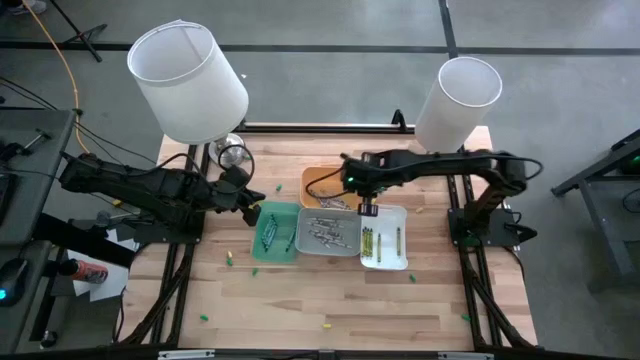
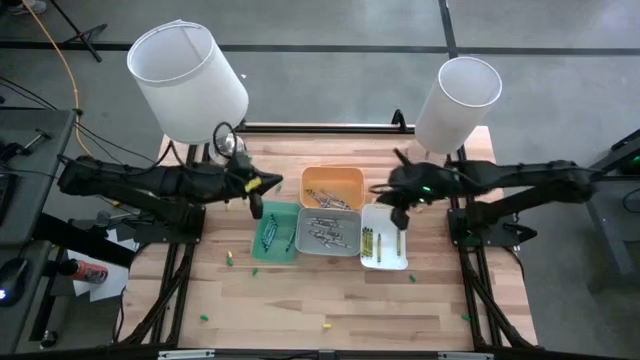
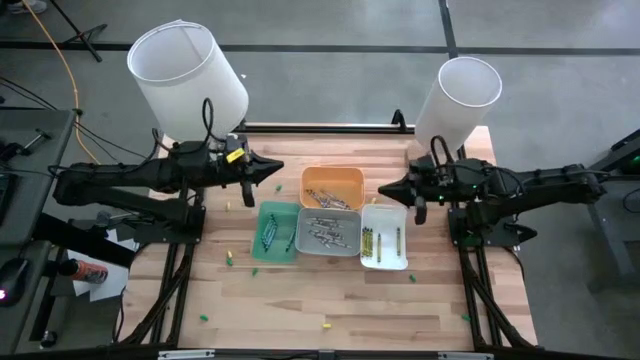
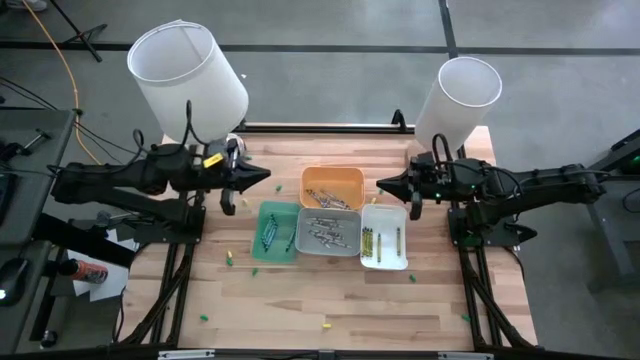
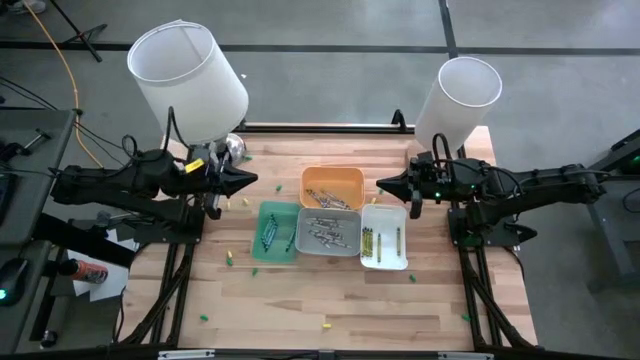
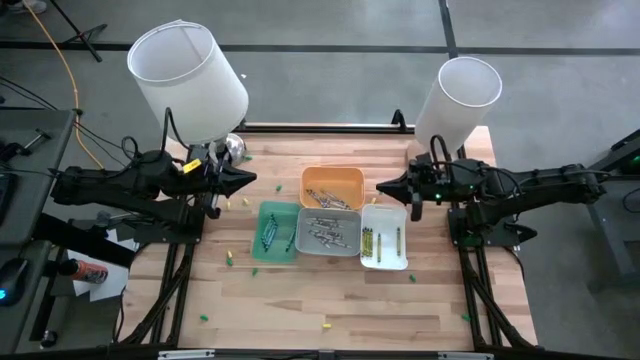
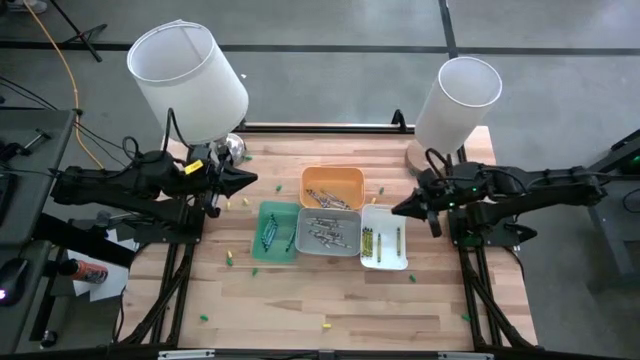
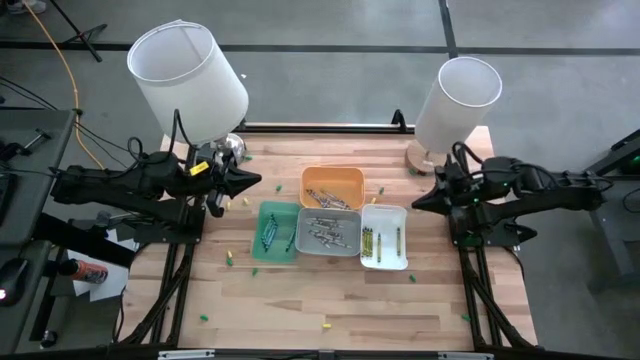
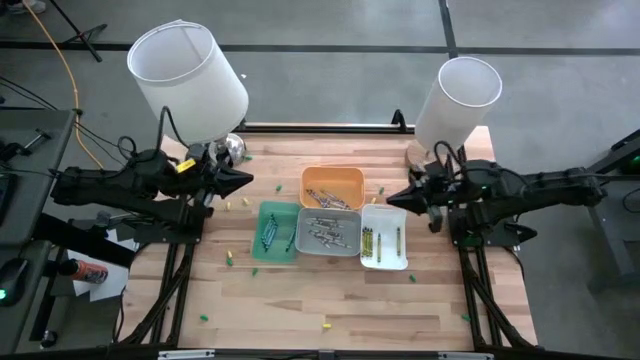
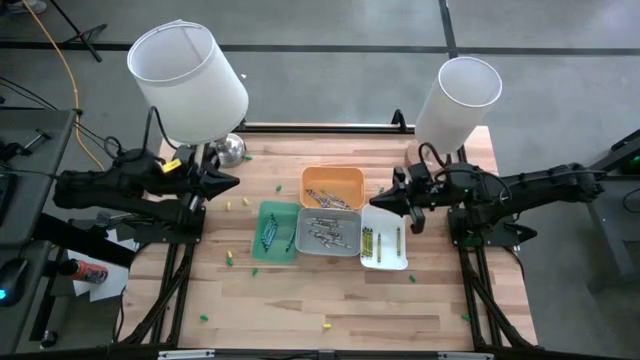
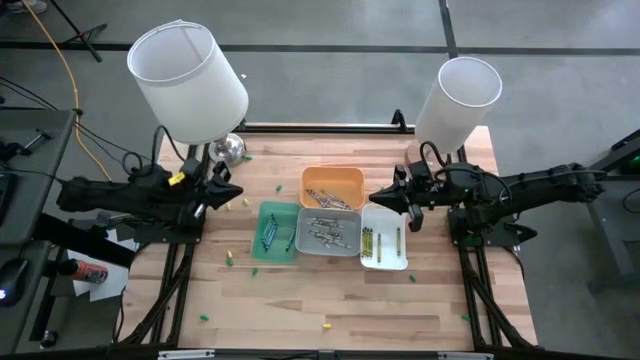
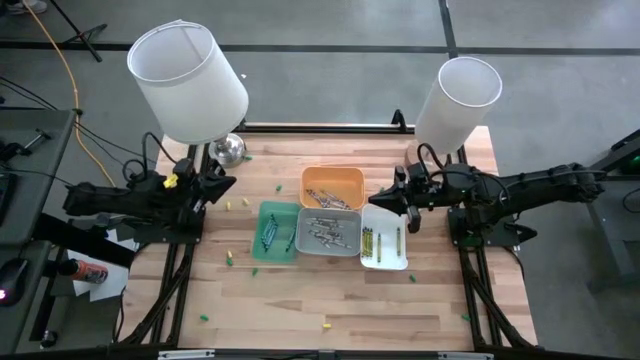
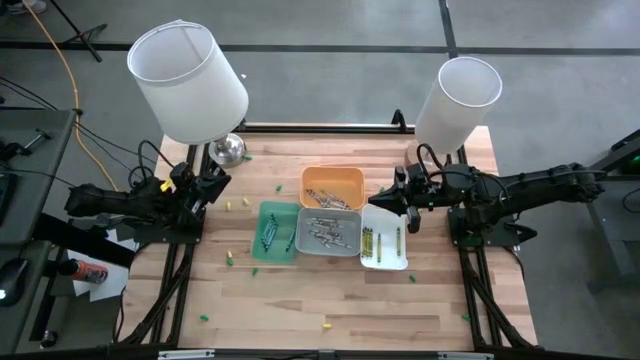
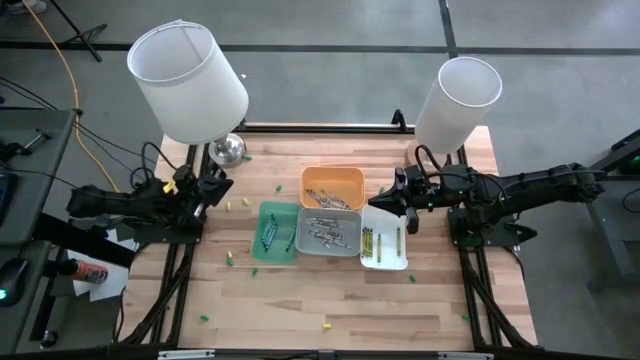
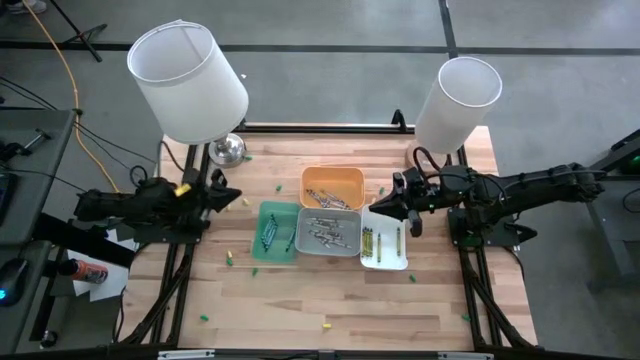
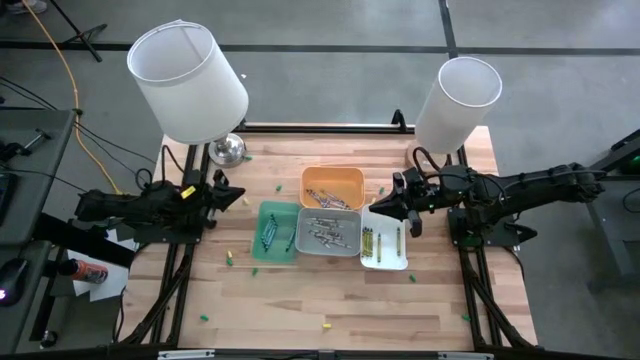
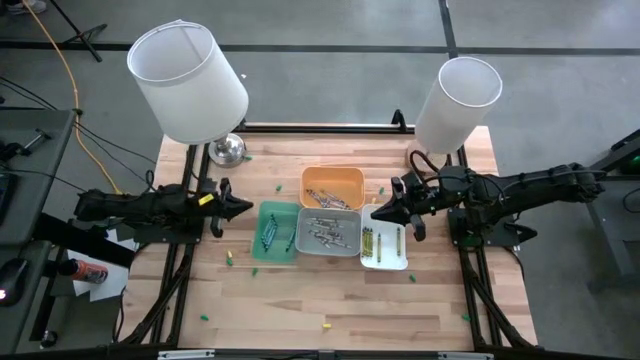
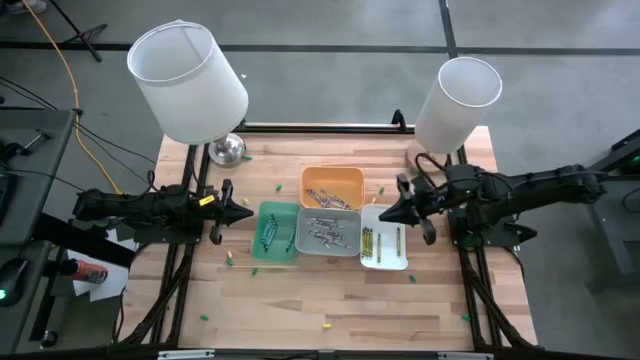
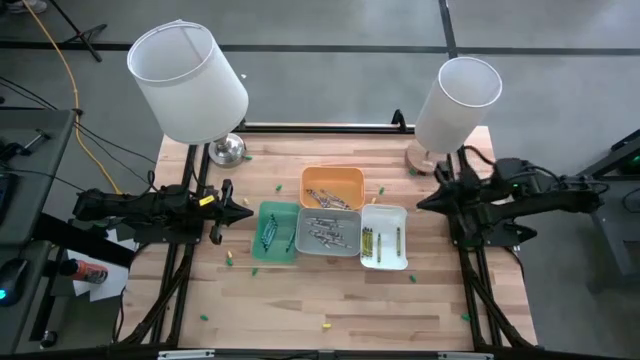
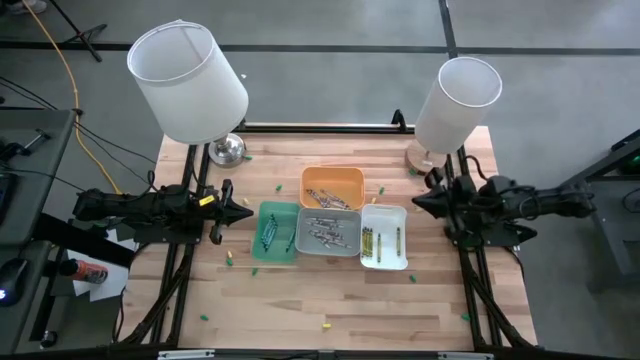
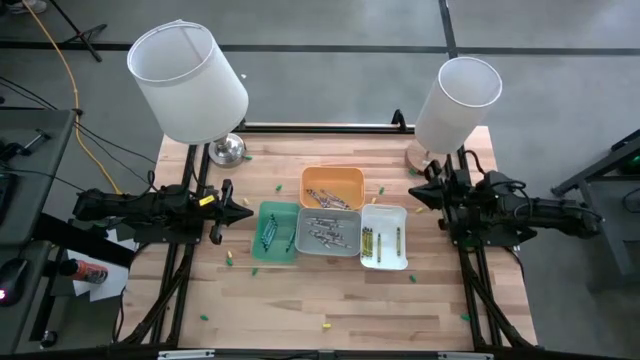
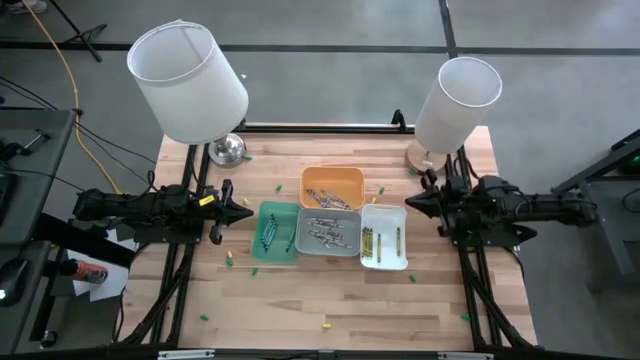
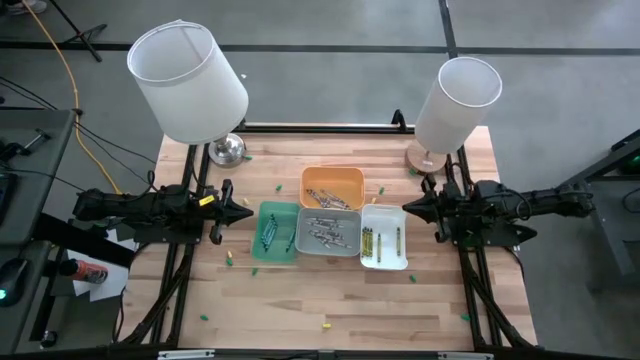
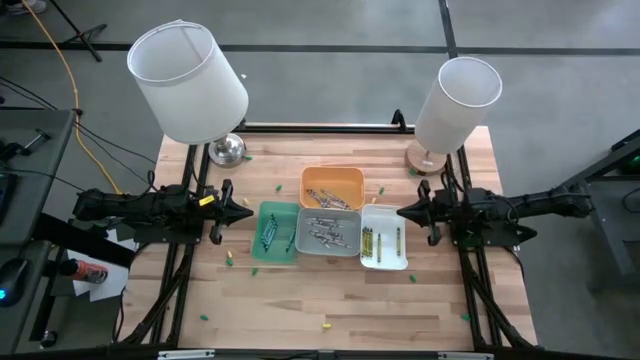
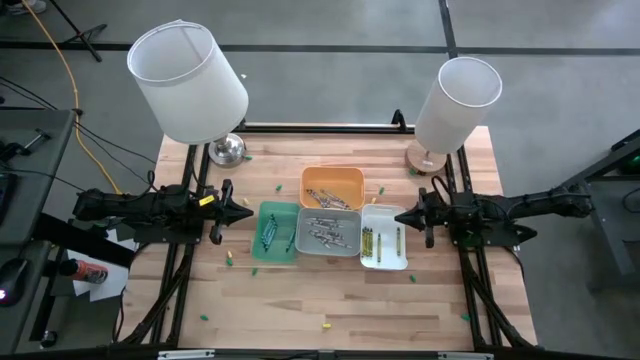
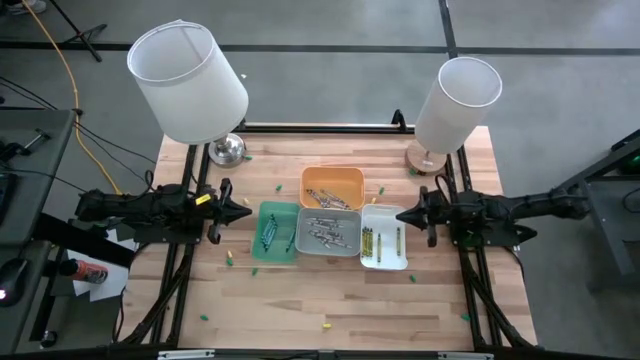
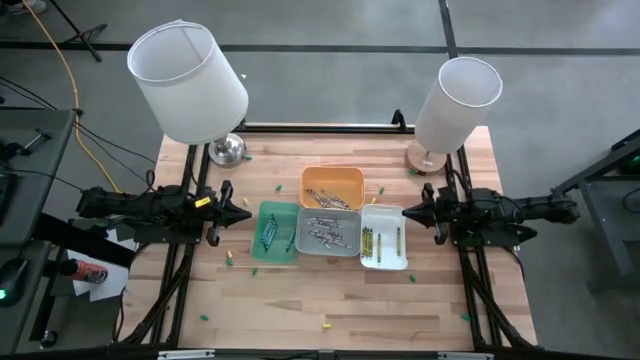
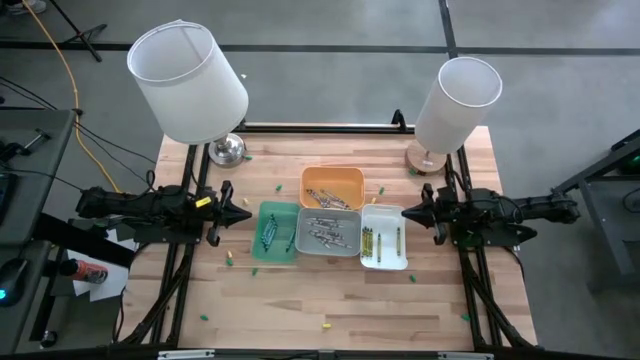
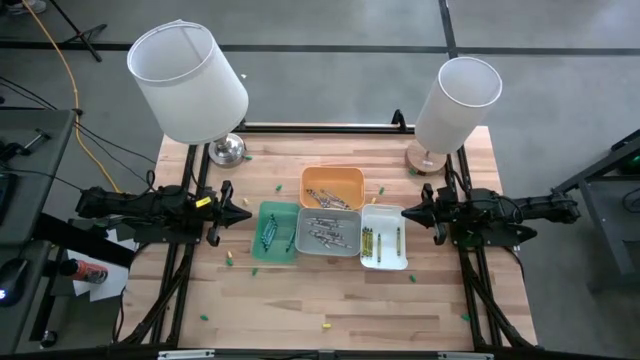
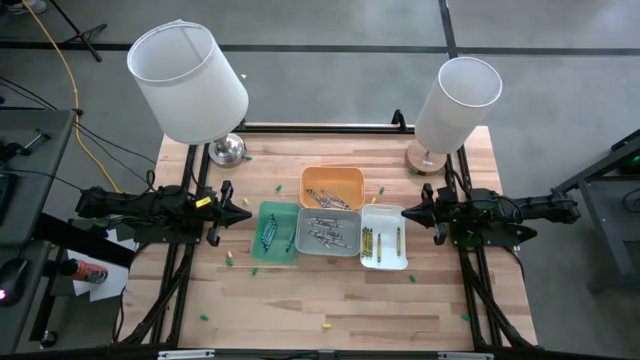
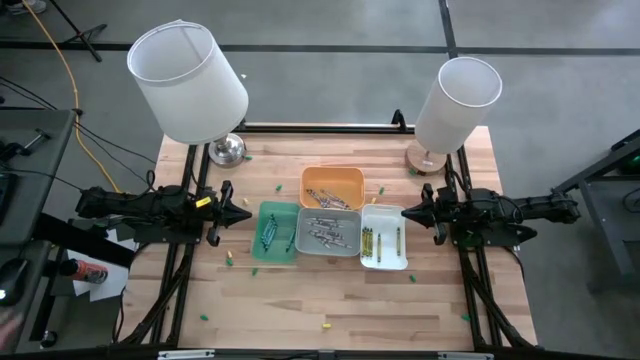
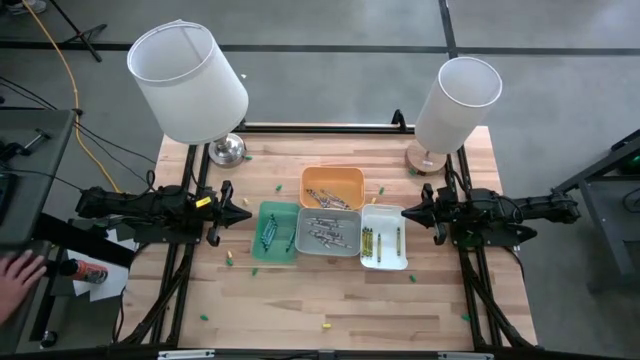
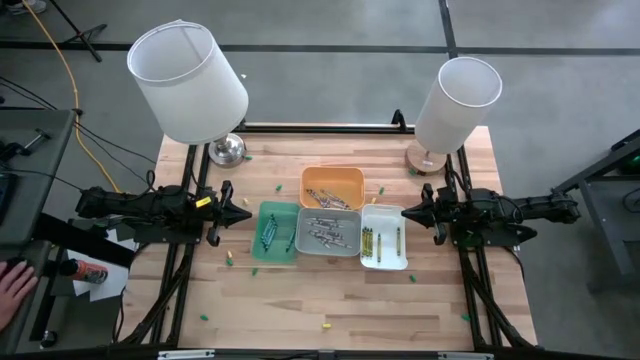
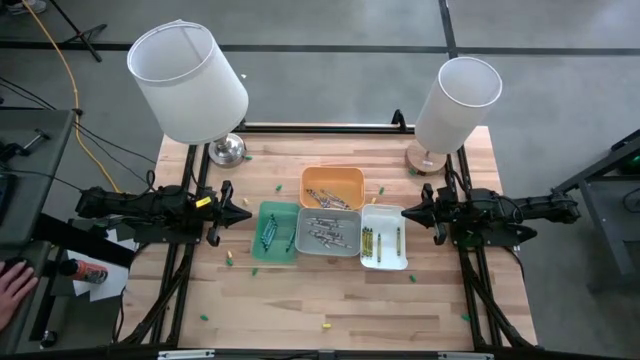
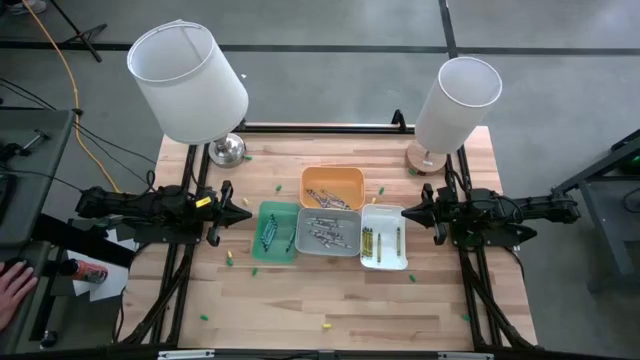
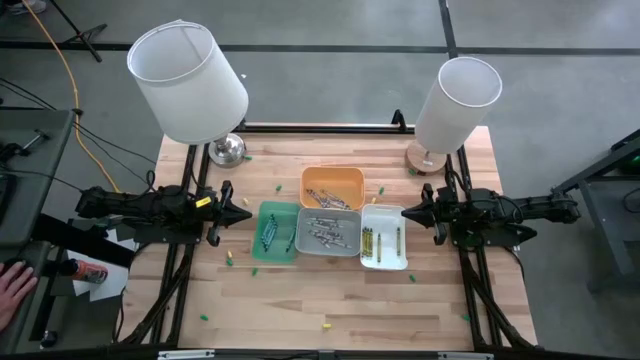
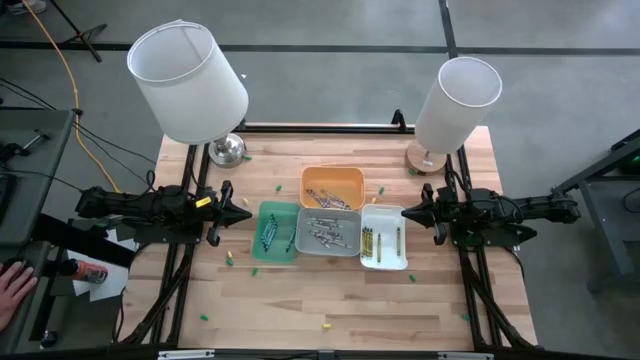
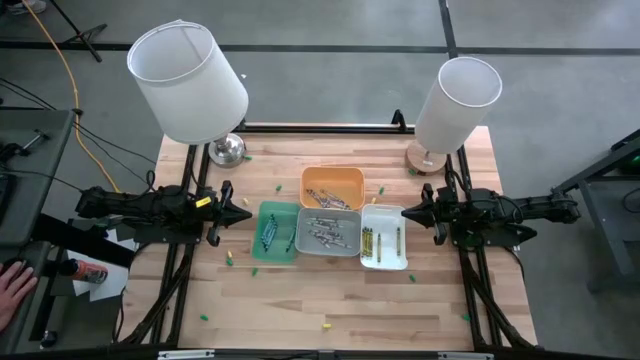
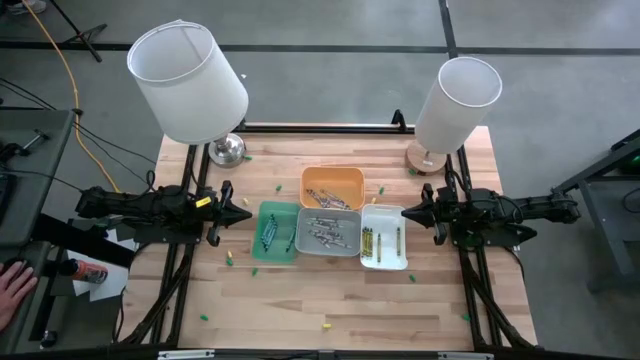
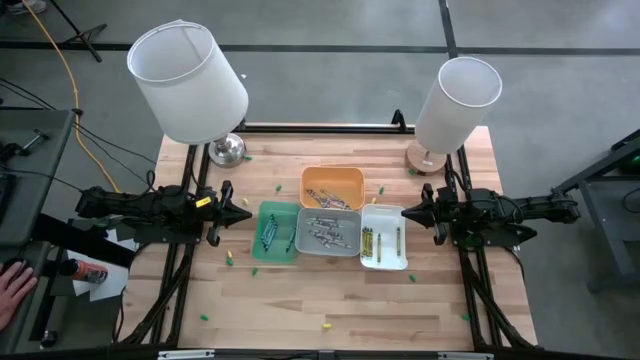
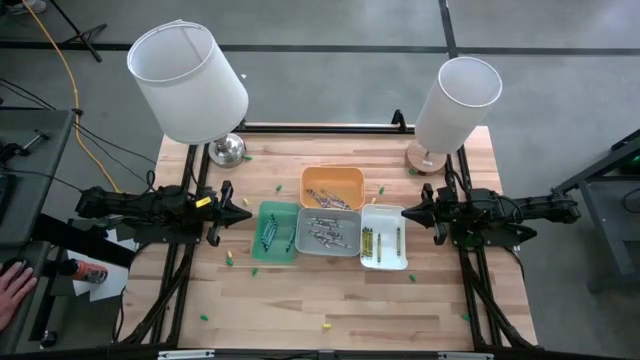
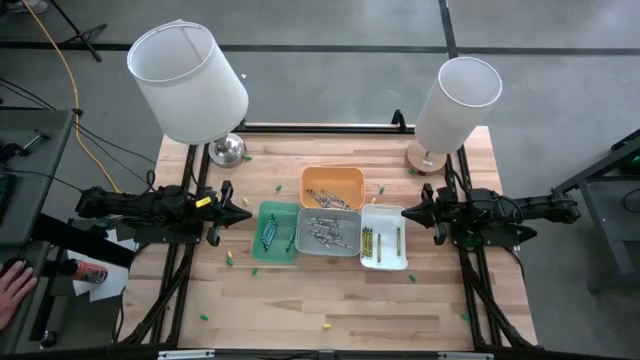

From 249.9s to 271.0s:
Task: Sort crayons
Return to Home Position
